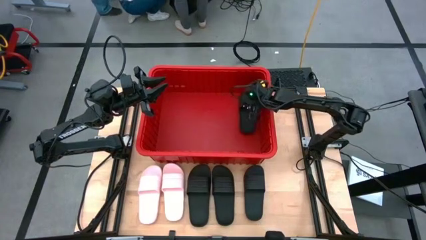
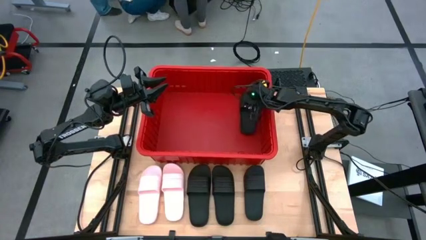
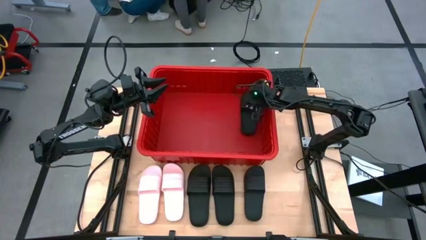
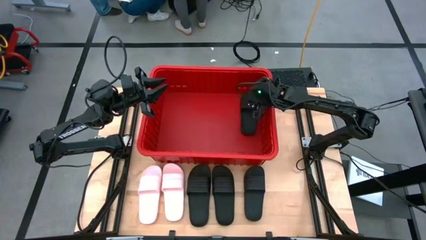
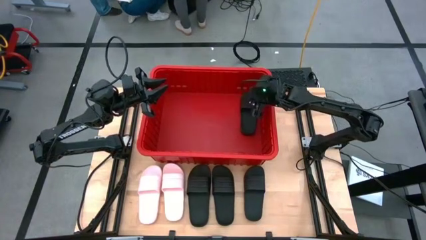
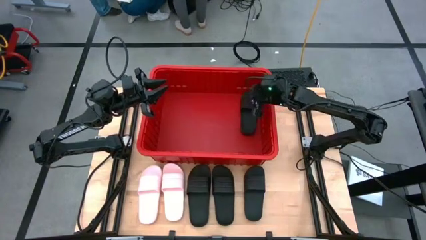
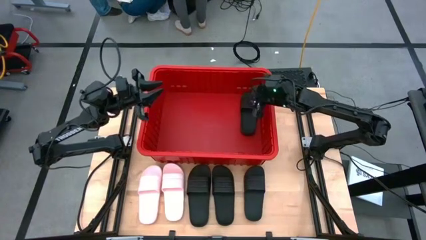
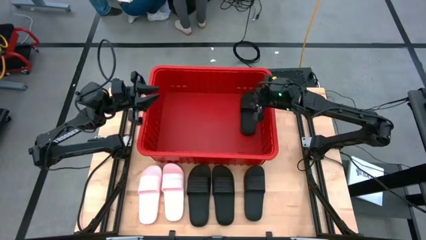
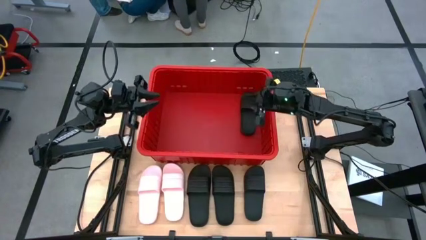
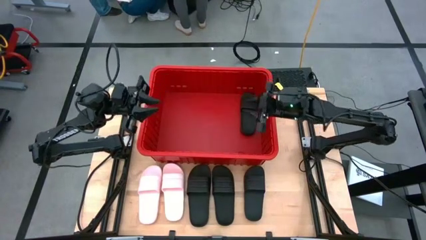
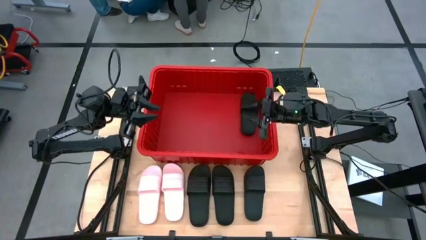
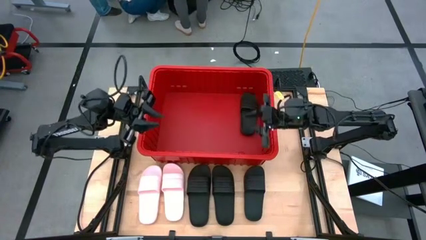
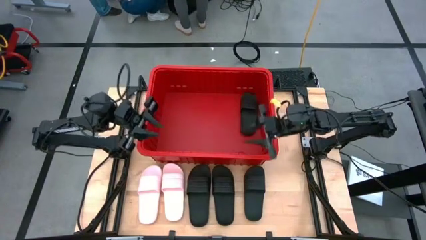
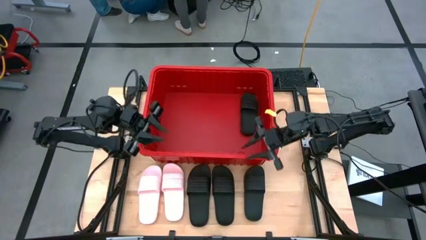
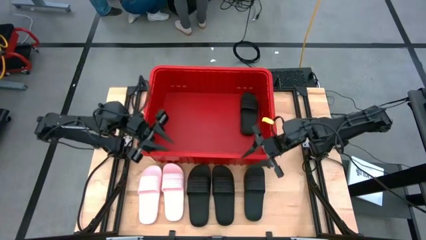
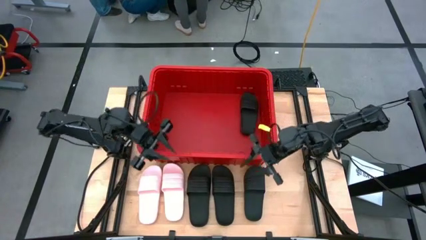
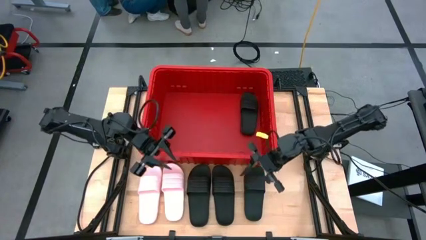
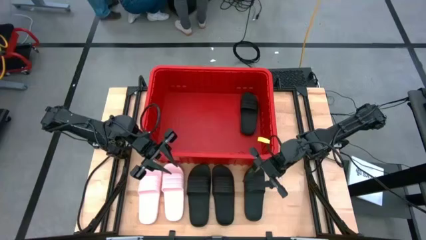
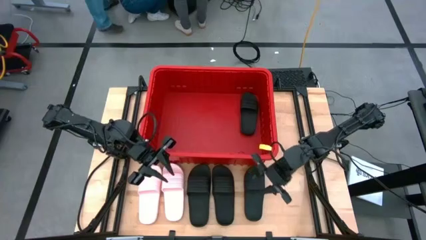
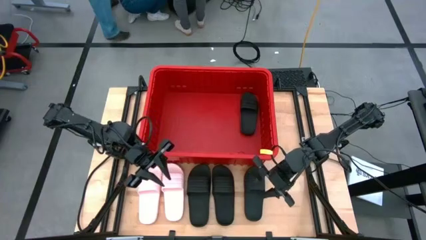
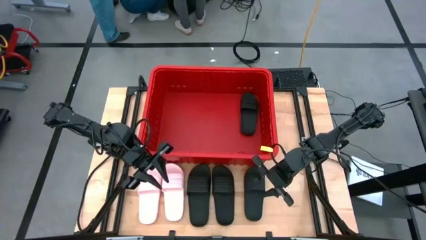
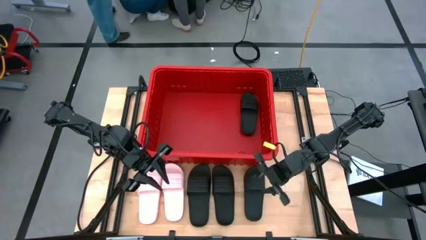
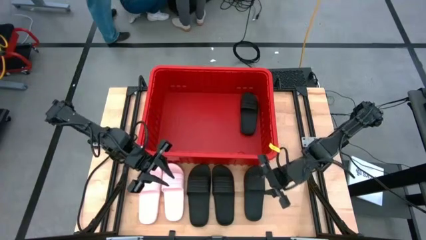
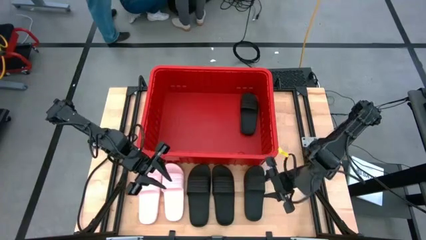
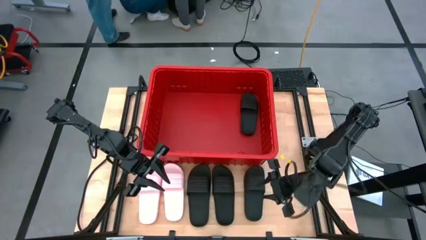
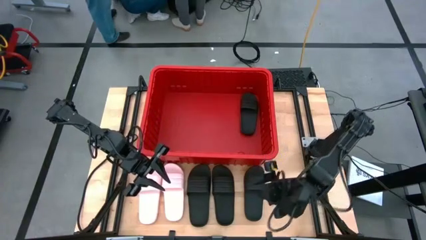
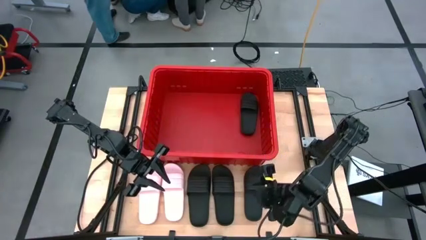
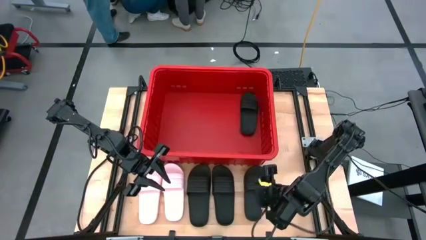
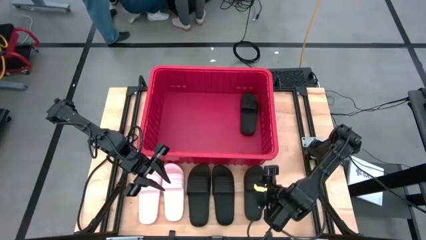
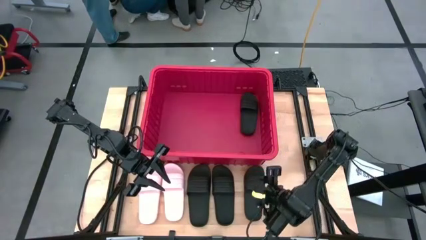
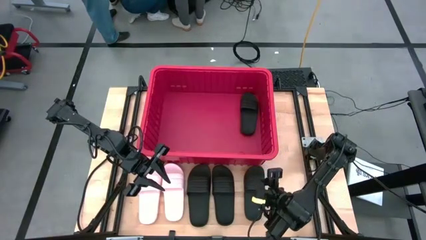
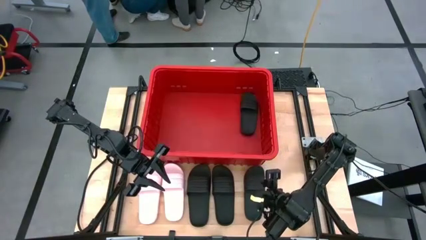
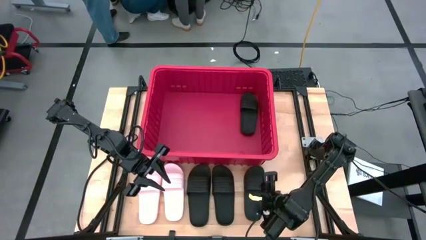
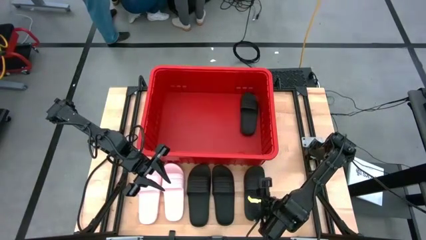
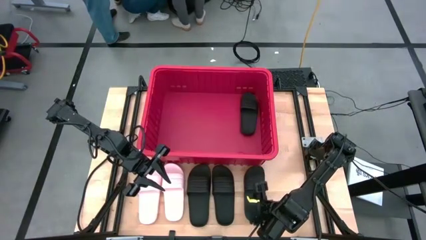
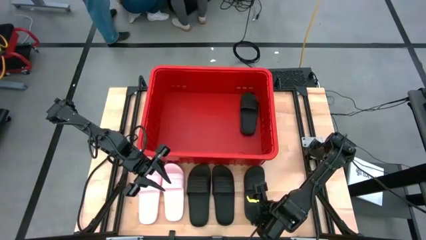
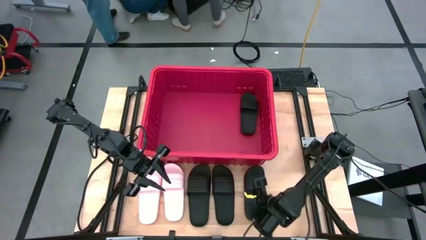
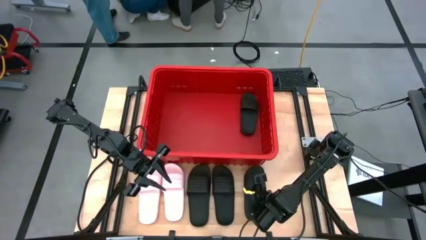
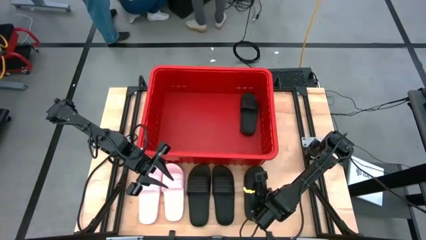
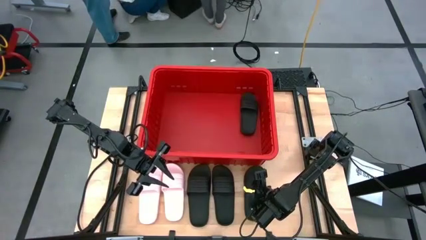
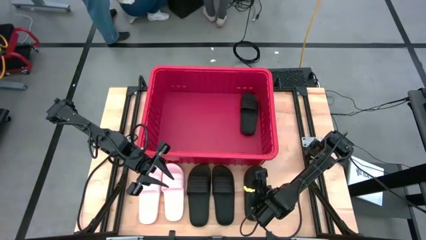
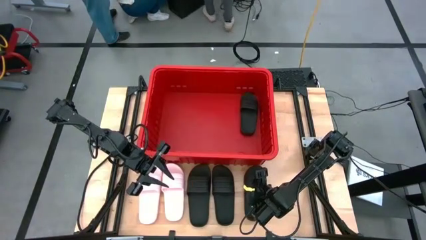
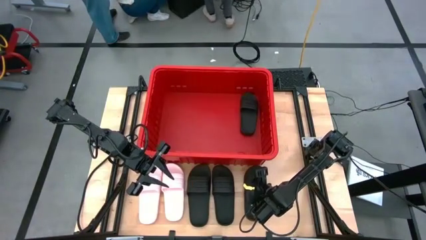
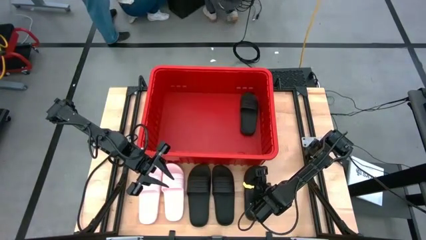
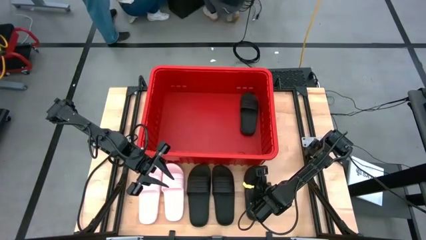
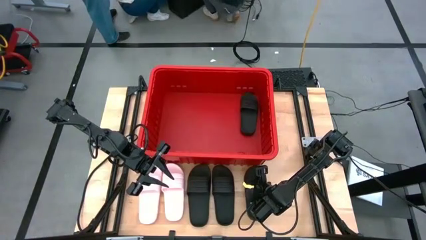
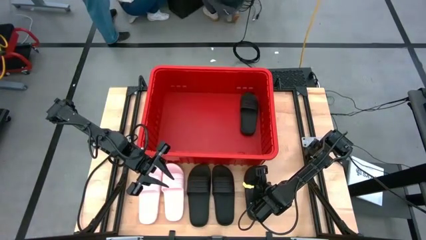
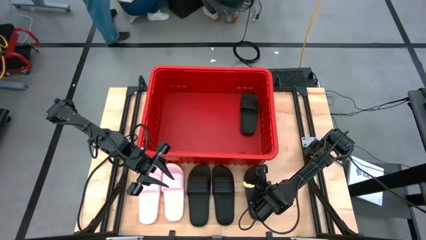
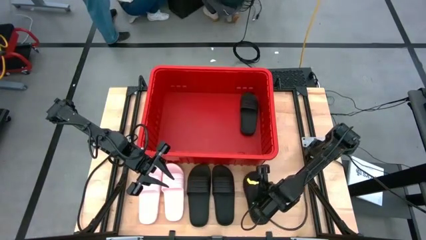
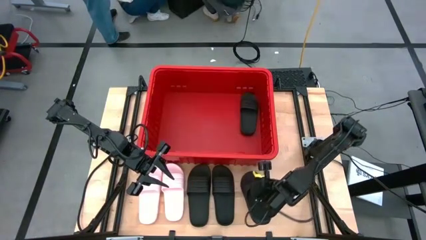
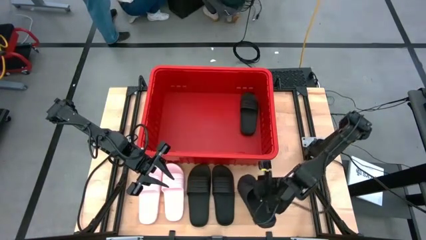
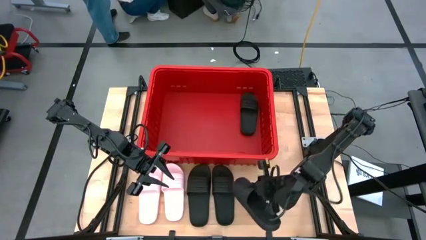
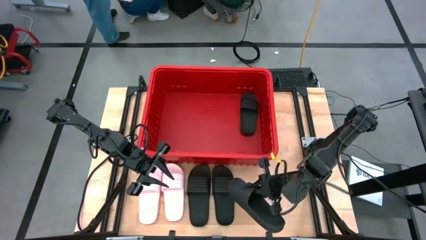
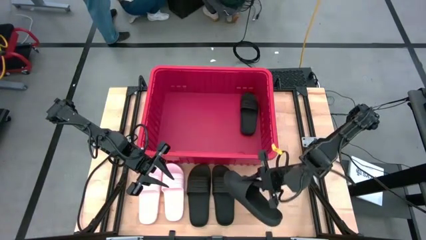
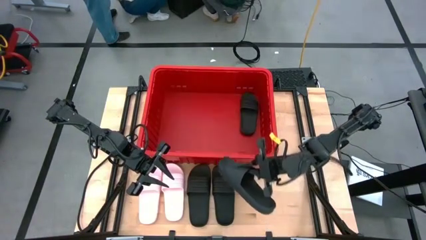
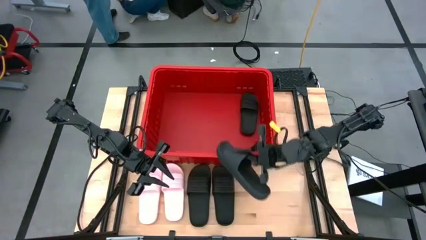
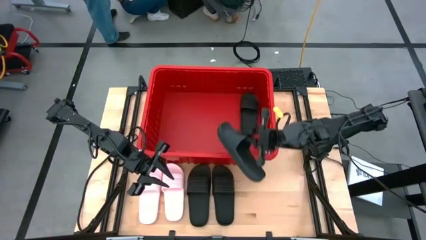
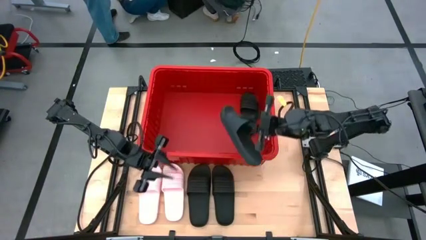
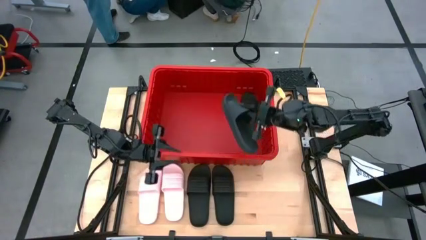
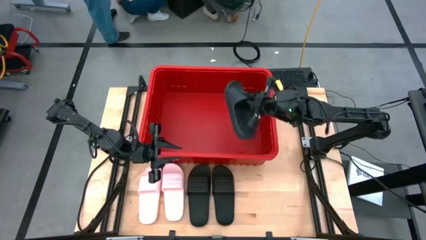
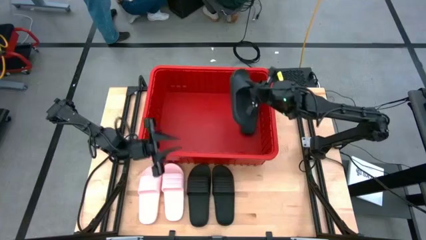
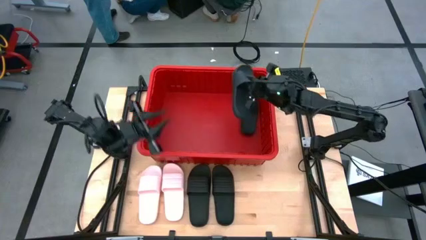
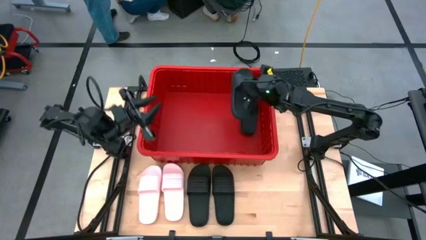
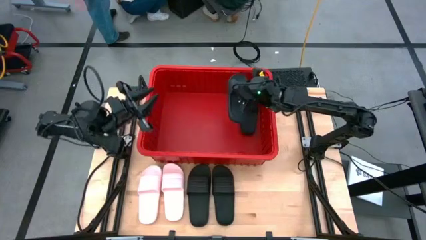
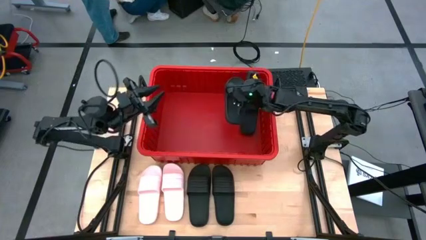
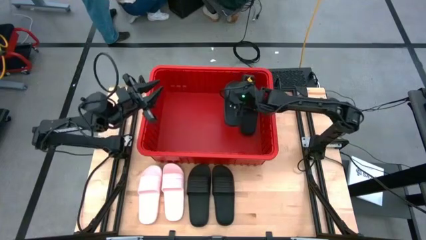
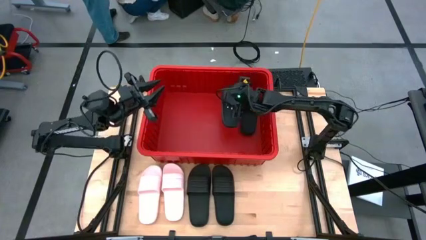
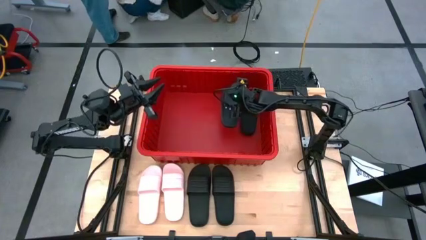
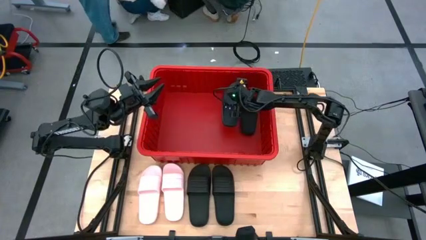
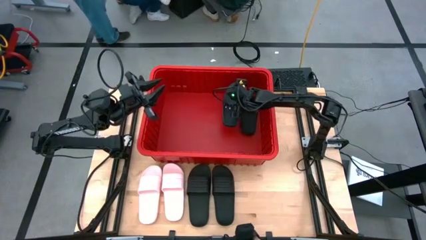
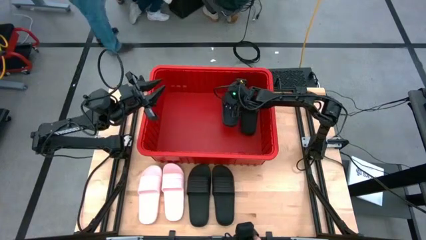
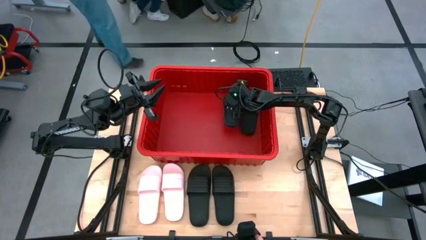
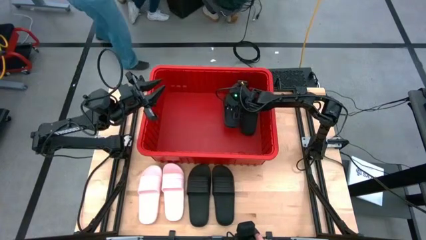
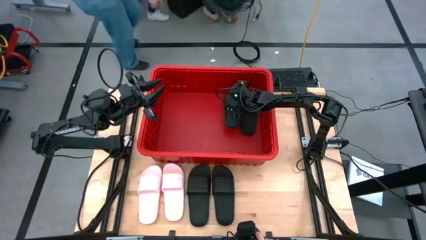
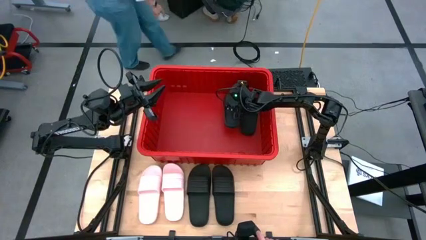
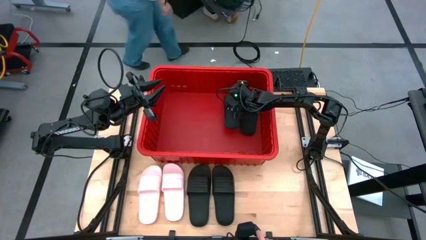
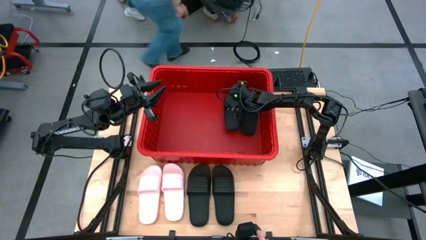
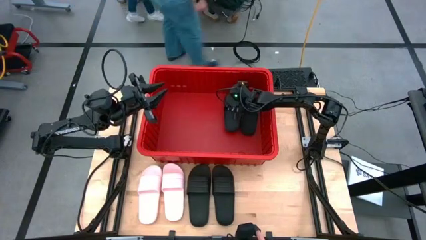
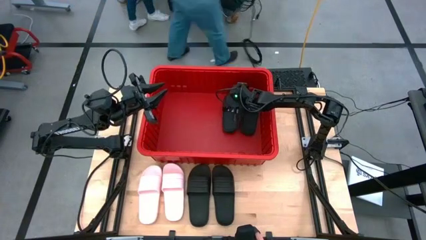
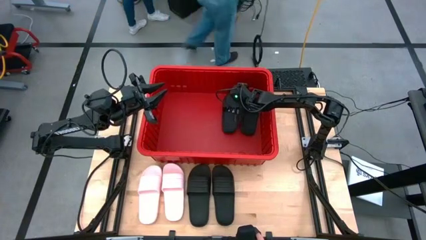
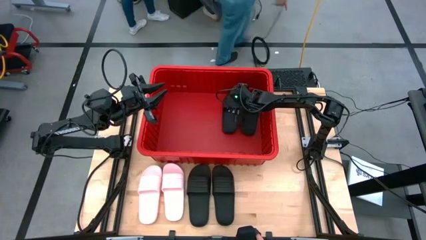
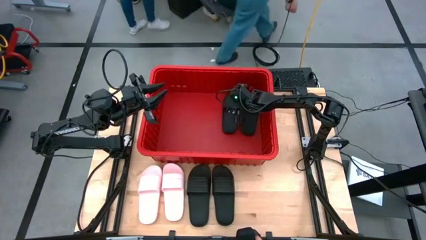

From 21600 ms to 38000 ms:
Task: Pick and place slides into bin
Put the right black slide into the red bin
